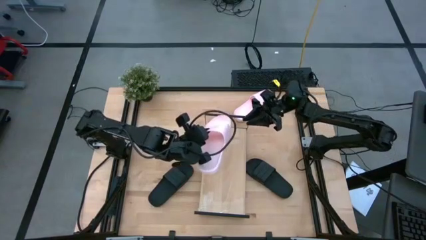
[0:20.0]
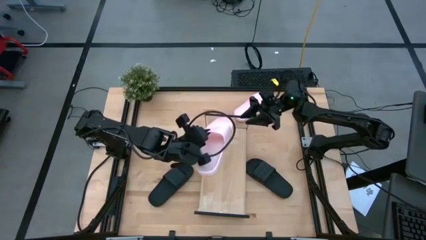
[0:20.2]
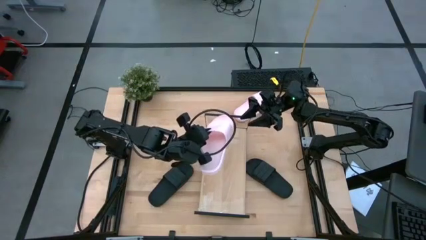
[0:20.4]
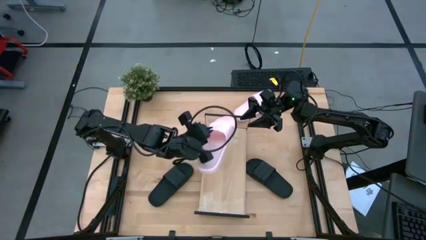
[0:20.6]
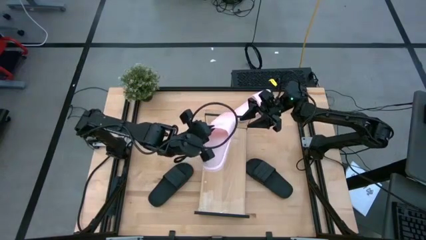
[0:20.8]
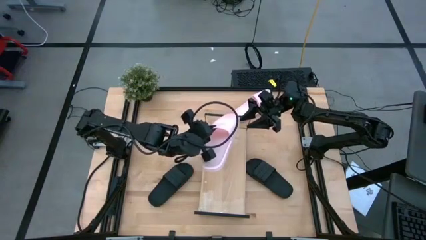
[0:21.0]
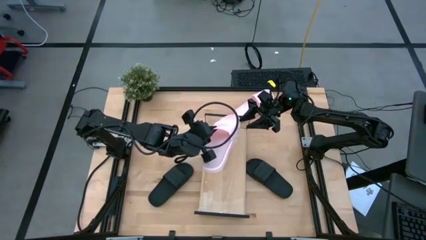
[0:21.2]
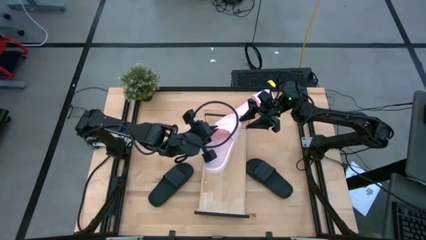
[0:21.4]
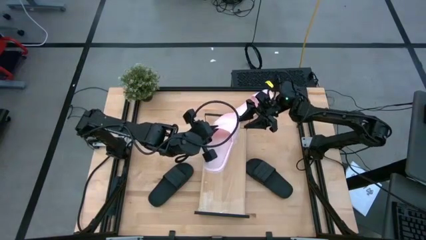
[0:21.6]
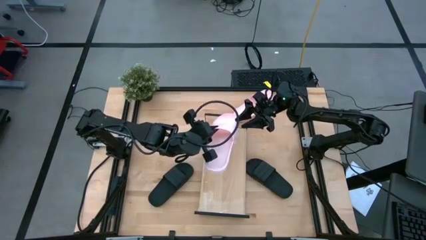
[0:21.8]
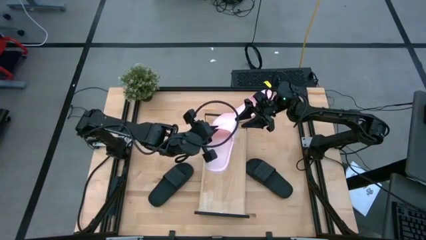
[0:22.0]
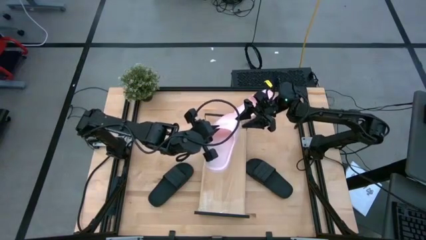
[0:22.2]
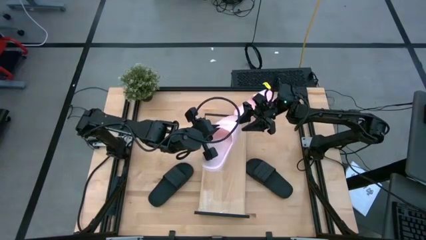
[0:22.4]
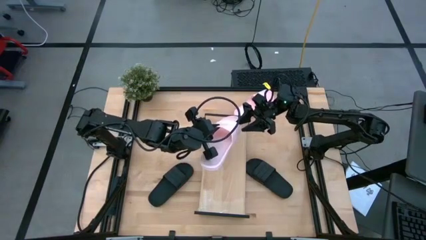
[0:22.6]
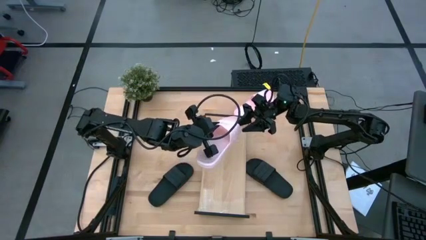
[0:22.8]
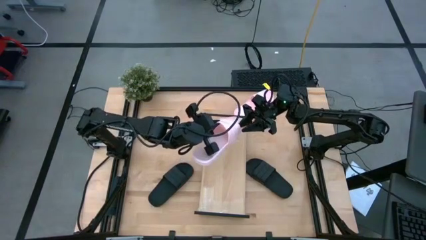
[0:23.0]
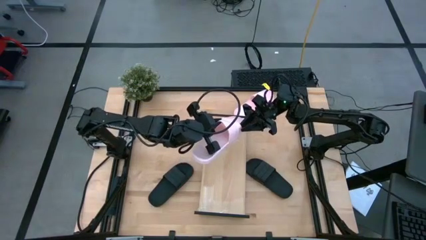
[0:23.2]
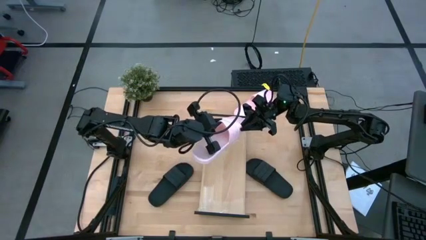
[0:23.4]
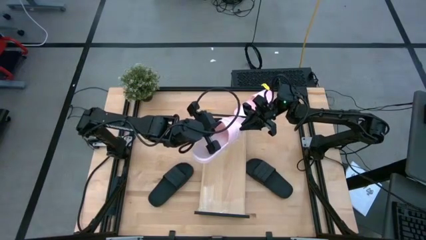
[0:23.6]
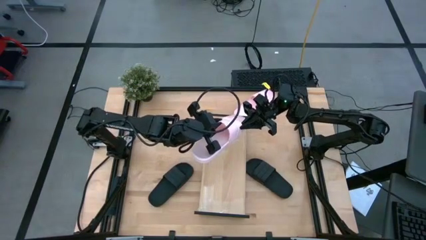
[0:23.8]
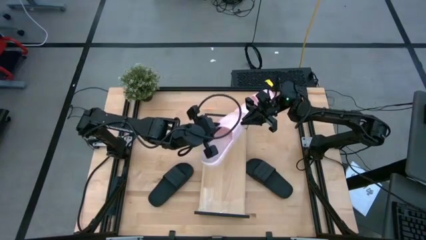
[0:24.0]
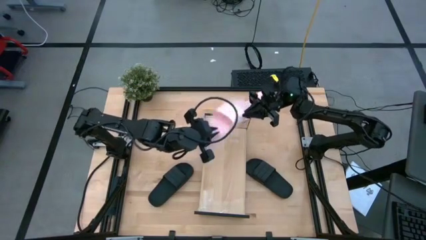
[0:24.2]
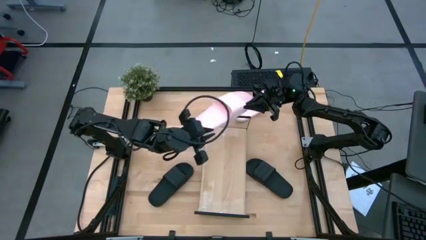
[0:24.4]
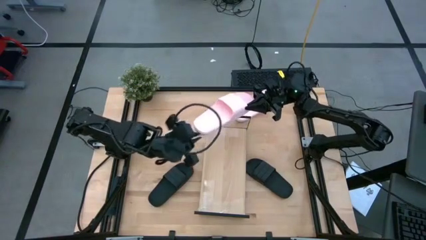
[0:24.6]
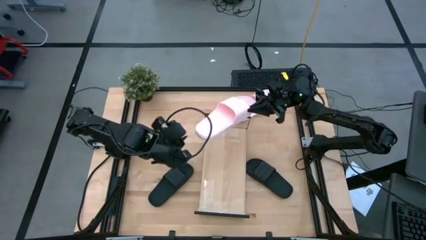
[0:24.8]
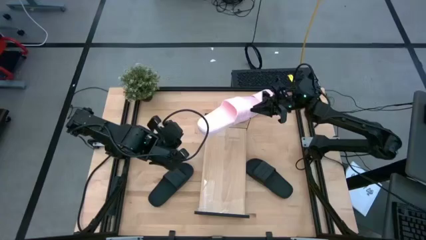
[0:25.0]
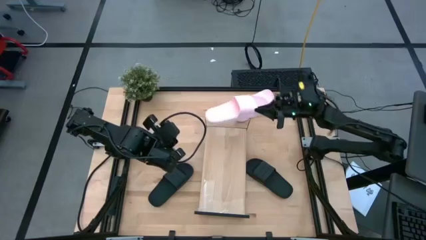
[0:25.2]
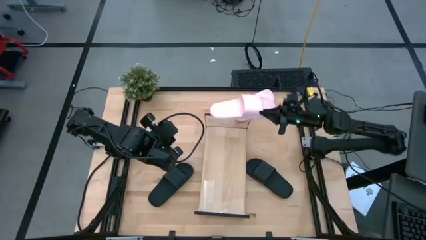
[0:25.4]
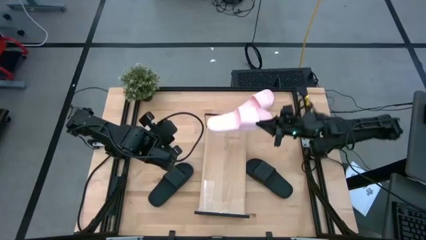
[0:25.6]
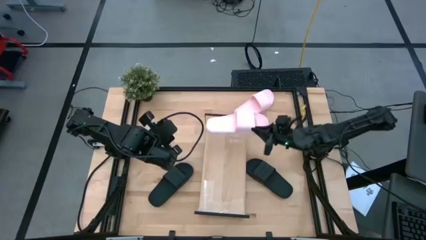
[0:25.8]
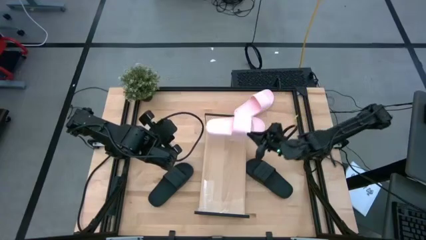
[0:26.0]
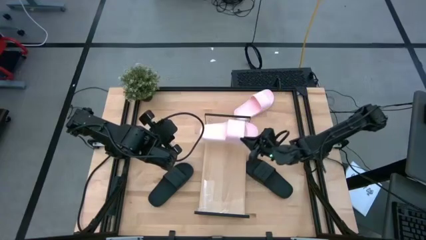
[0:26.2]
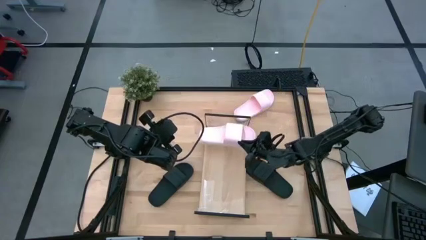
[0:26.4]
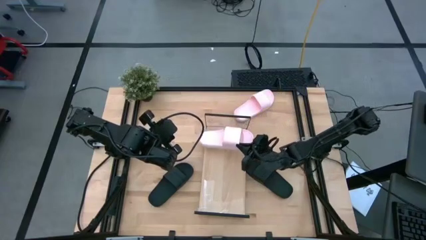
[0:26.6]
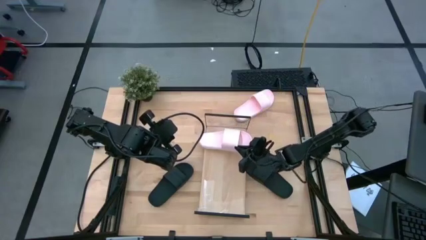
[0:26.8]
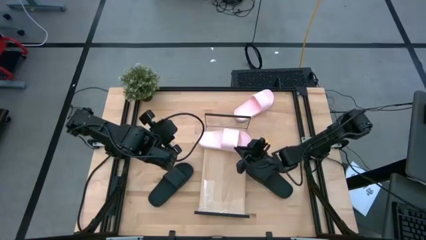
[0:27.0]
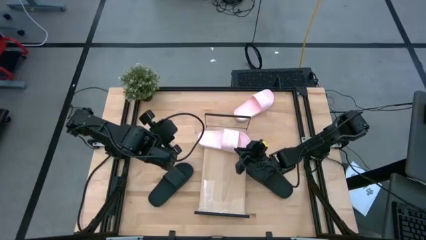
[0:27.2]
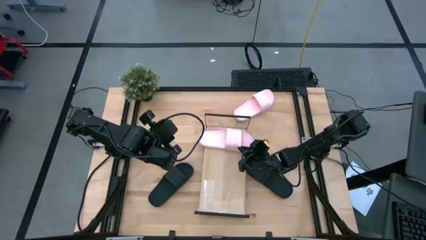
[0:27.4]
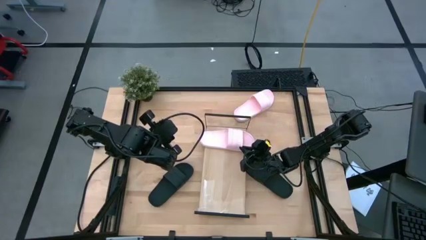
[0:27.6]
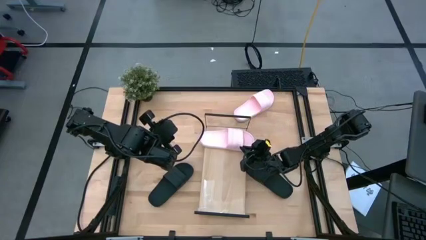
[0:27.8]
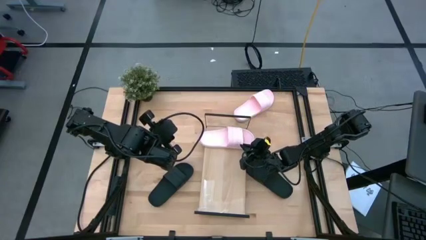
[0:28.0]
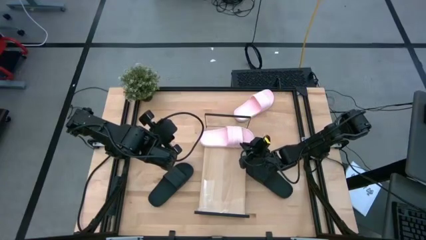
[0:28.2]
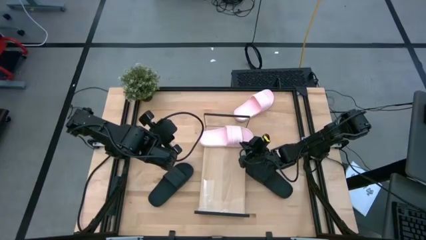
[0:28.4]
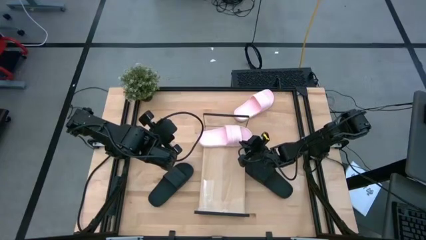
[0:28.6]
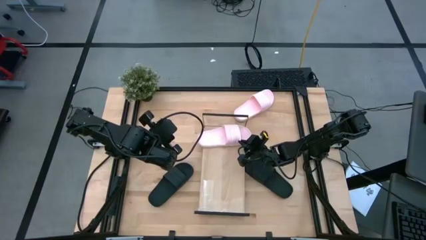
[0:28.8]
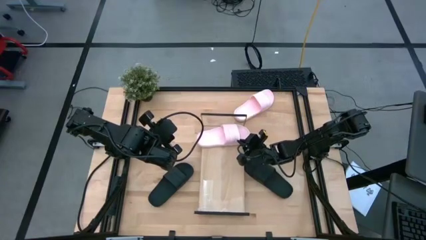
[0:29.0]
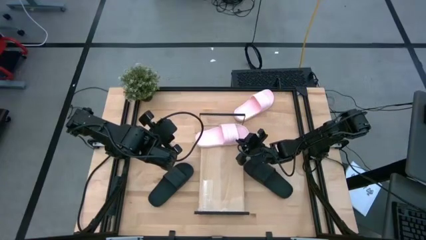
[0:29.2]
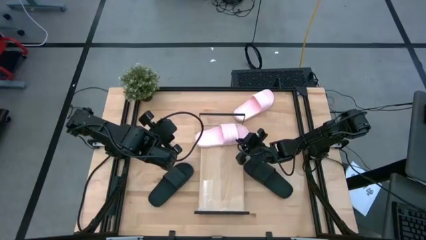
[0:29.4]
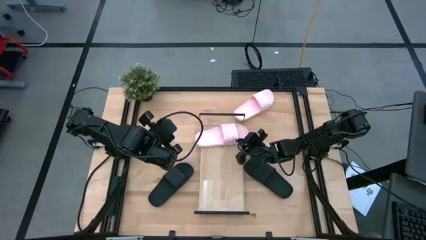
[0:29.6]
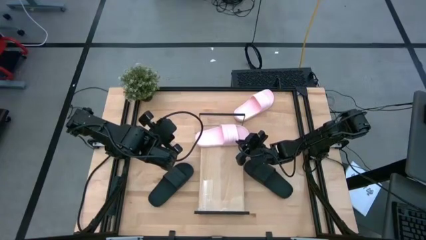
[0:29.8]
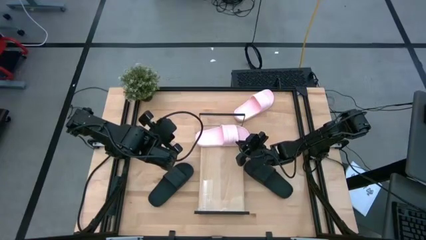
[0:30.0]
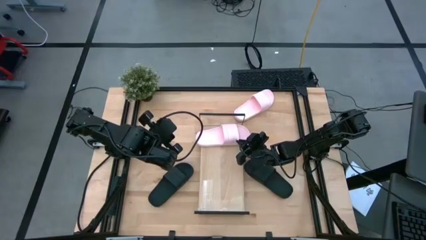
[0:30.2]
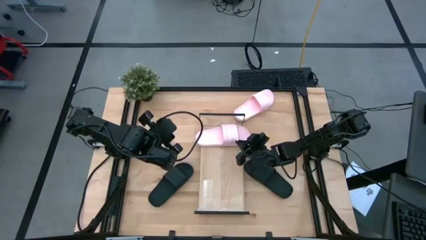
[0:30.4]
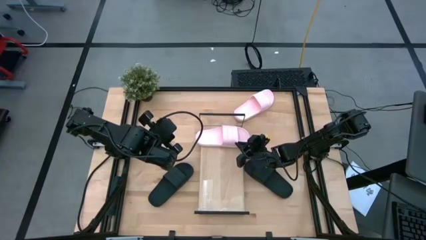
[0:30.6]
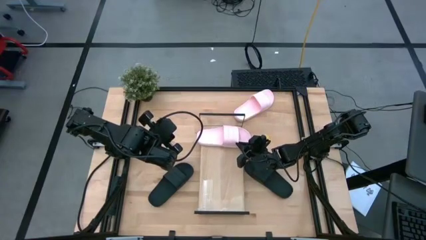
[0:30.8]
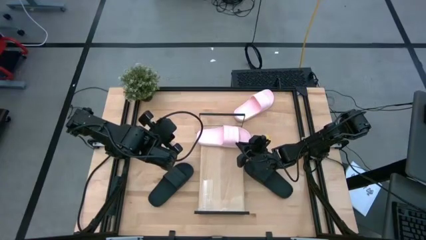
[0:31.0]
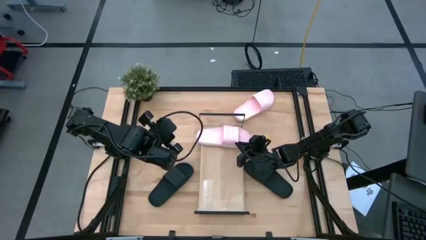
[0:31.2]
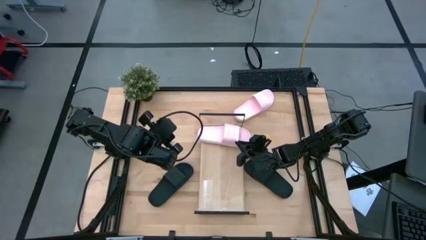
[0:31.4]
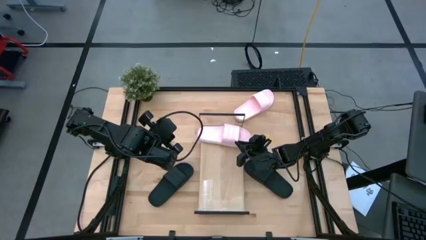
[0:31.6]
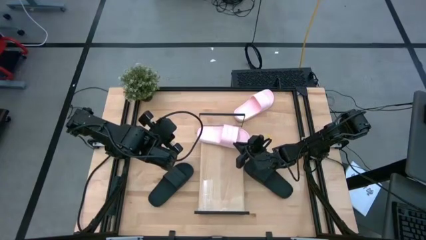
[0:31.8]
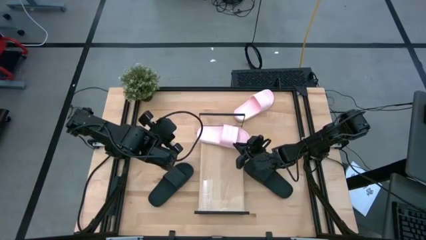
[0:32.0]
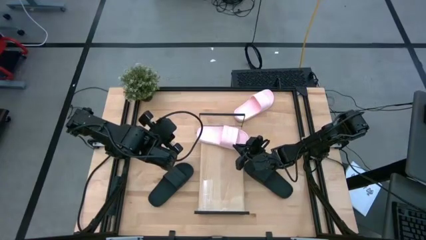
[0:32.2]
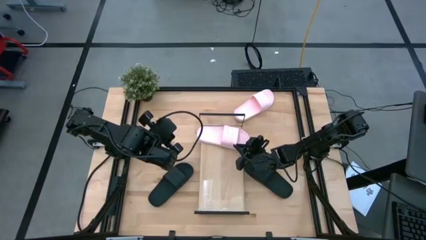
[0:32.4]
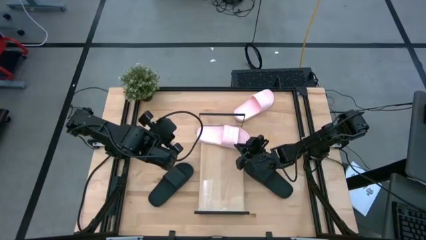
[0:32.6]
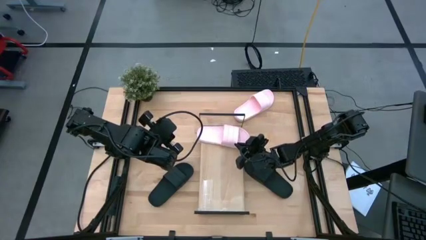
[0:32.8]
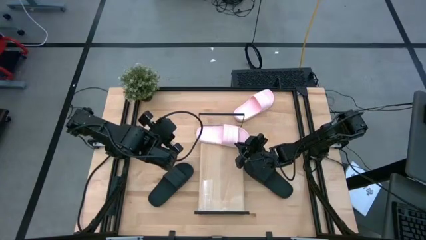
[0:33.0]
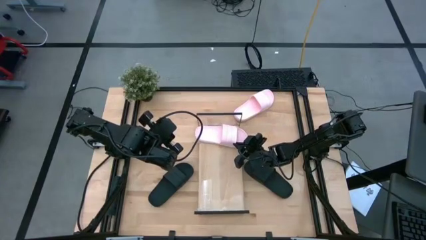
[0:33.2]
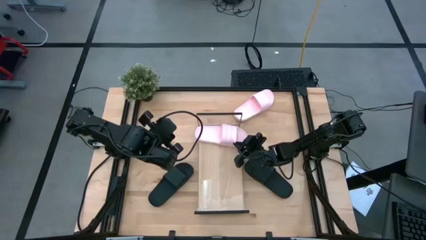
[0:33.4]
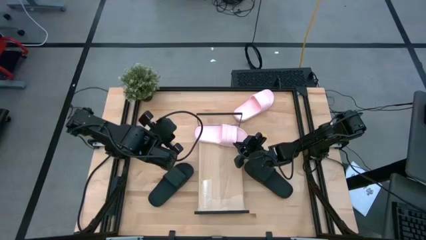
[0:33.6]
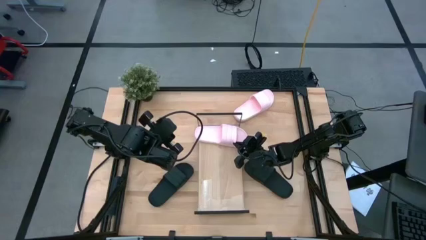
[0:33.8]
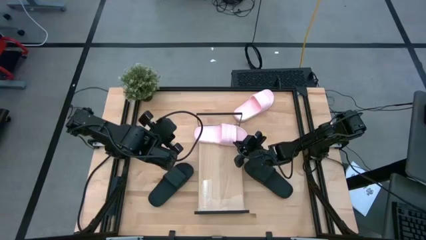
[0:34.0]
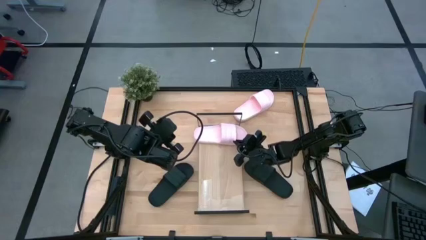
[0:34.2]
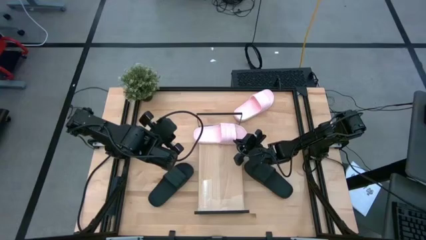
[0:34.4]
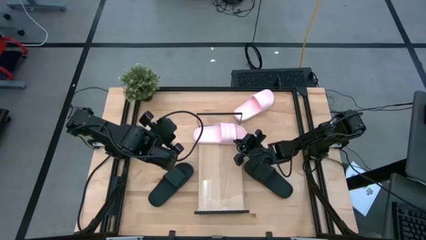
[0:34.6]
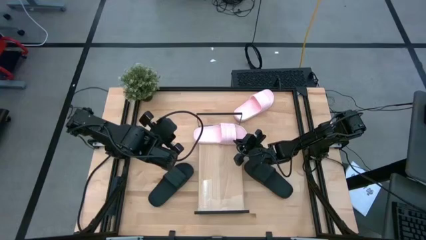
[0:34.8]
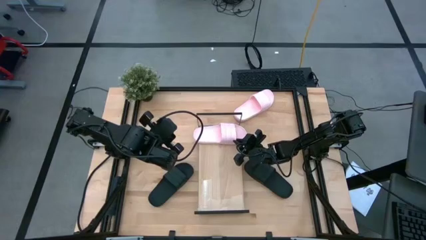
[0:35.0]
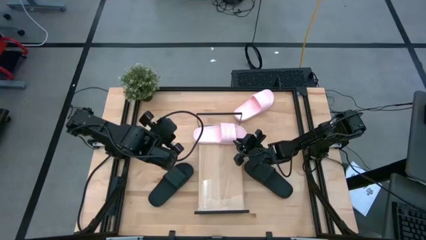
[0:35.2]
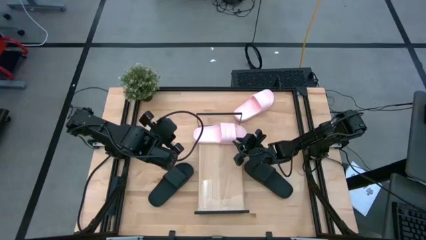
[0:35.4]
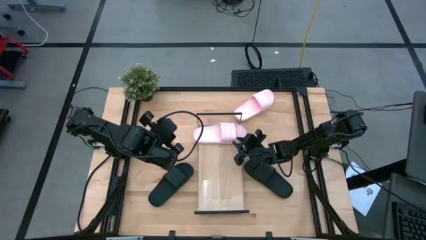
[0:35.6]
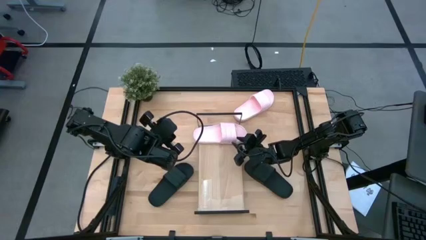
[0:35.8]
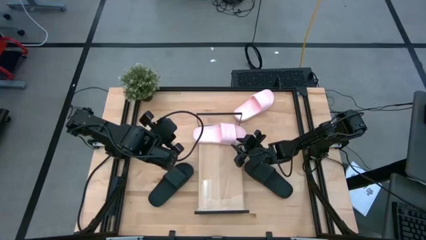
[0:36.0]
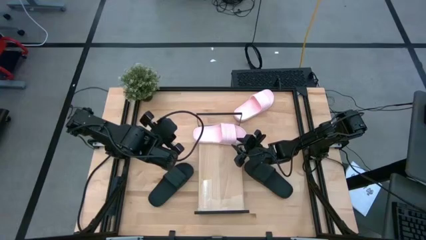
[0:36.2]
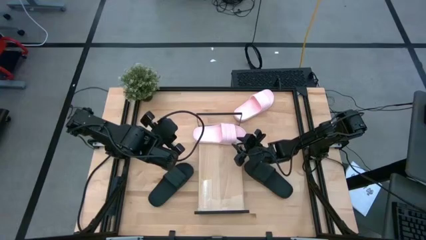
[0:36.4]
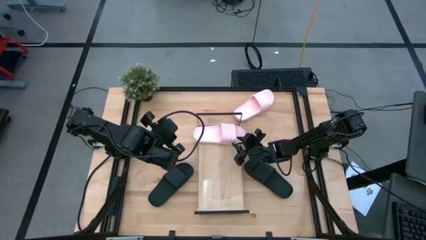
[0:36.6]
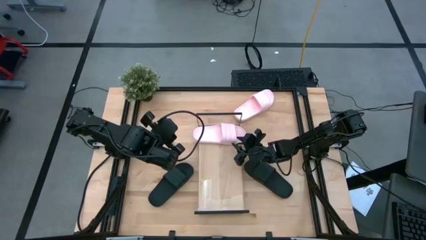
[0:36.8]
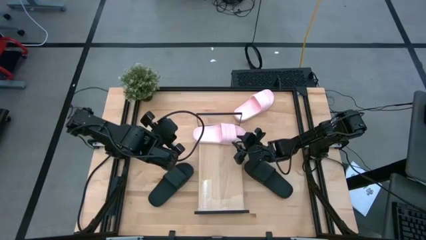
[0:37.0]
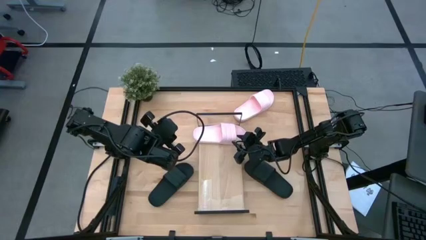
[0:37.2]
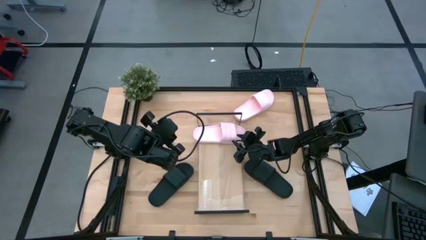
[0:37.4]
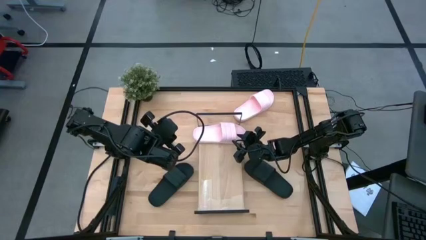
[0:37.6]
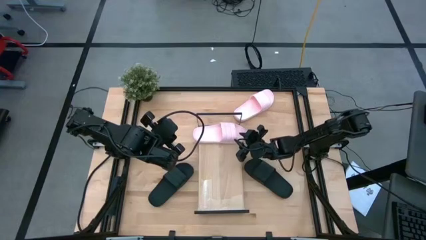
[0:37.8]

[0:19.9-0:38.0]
Task: Pick and place slides into the shelf
Put the left pink slide on the shelf
